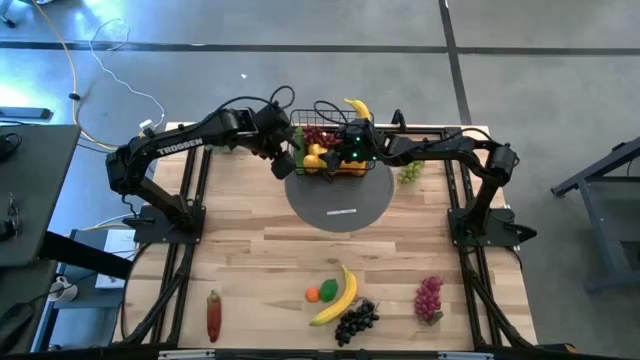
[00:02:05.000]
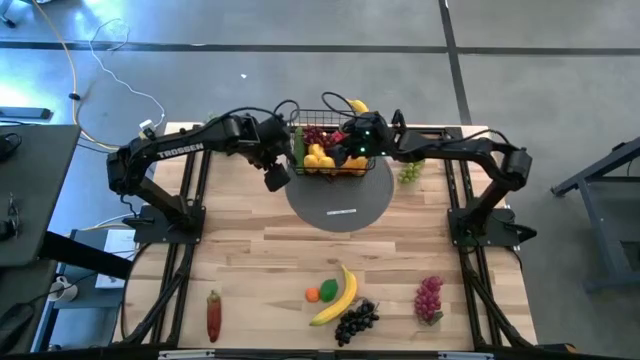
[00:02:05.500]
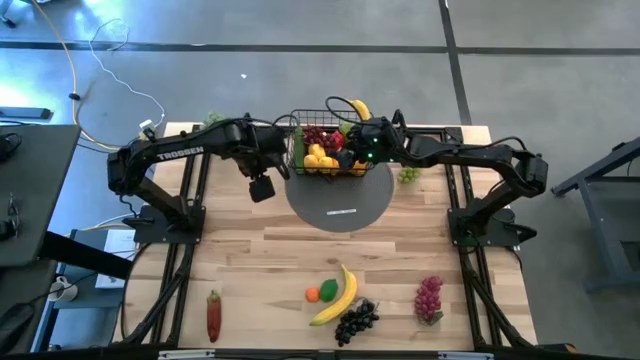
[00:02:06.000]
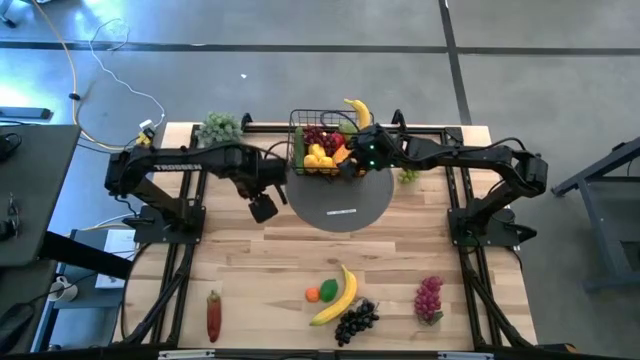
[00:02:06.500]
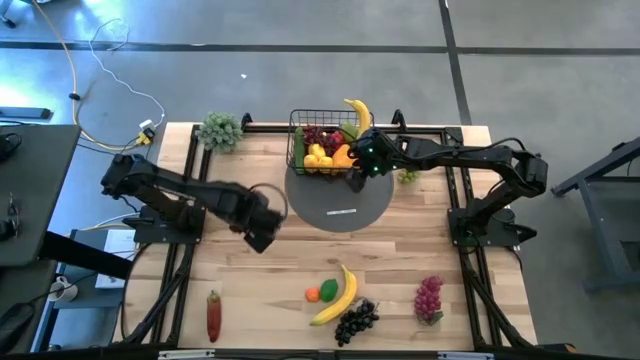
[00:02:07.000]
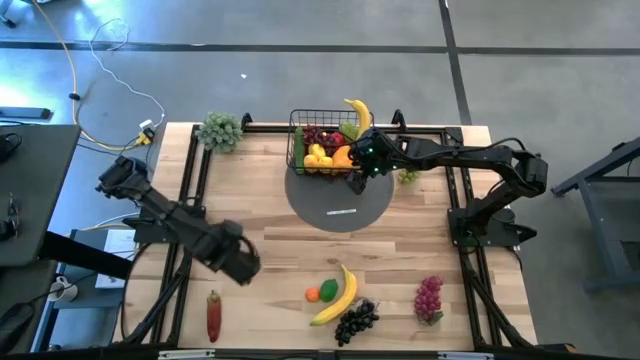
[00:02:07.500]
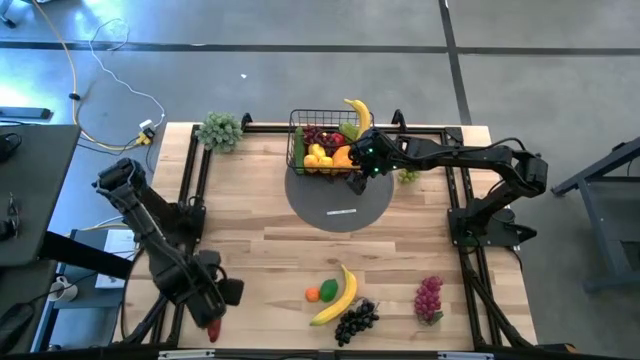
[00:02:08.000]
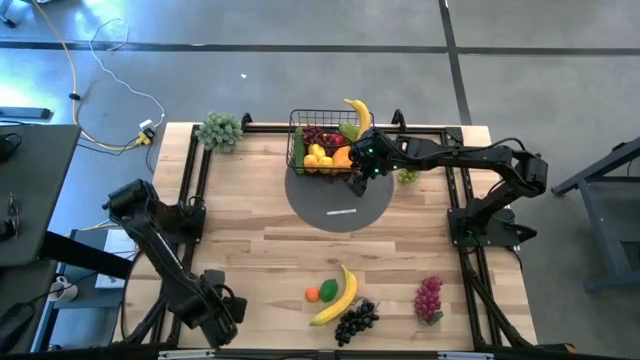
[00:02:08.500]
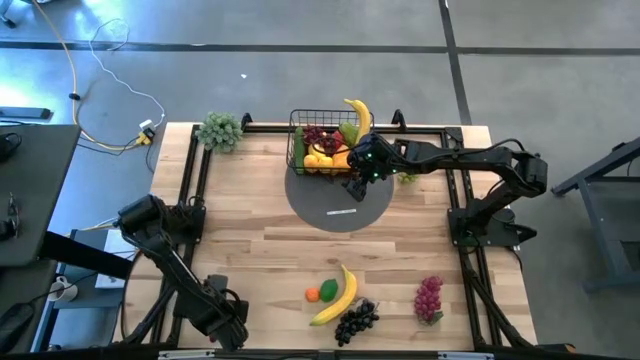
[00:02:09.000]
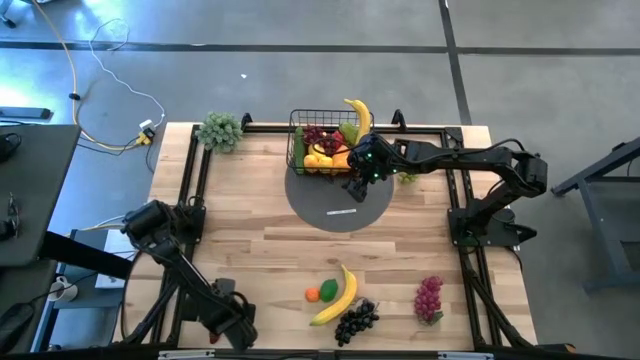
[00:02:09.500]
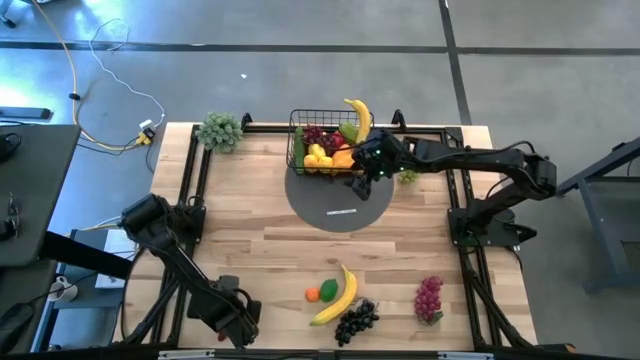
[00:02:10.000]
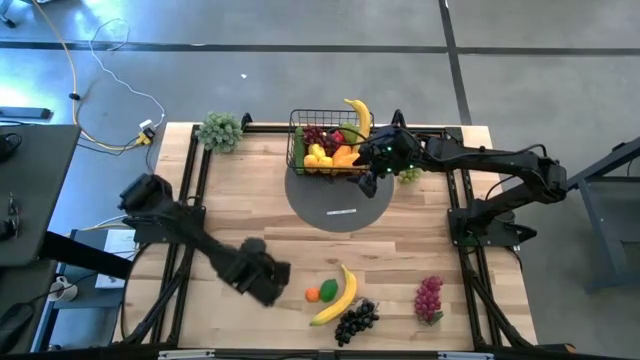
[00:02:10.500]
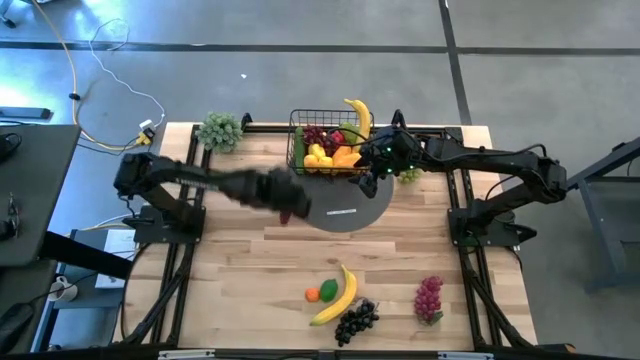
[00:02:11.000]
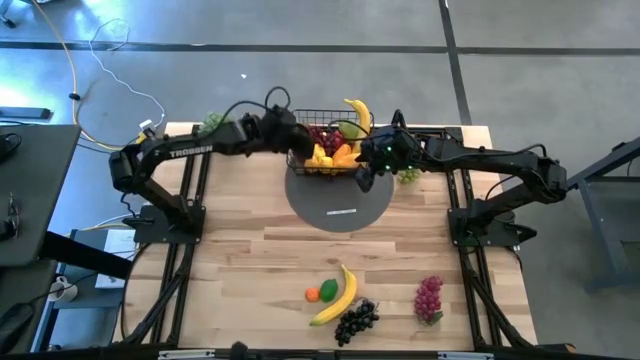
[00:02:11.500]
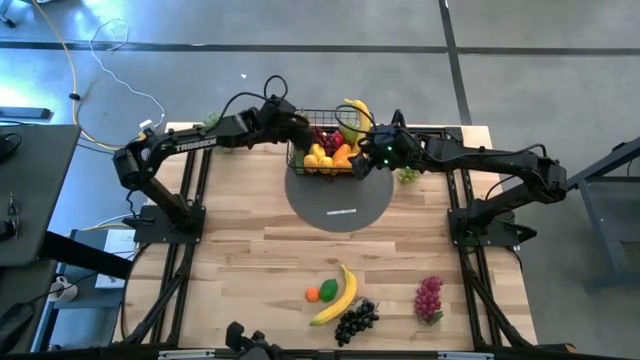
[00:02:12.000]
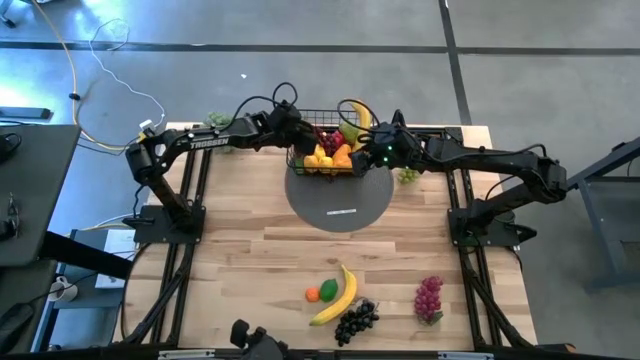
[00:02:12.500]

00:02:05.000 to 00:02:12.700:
Task: Build produce basket
Put the chili pepper into the wire basket

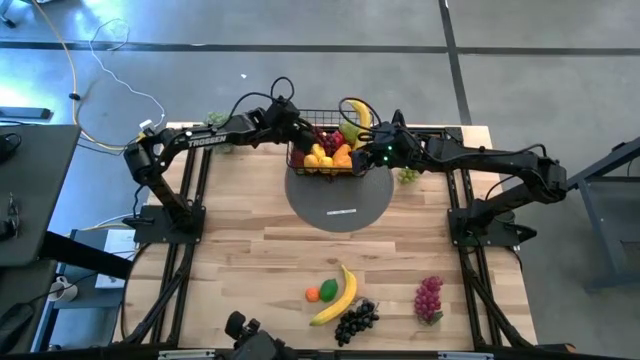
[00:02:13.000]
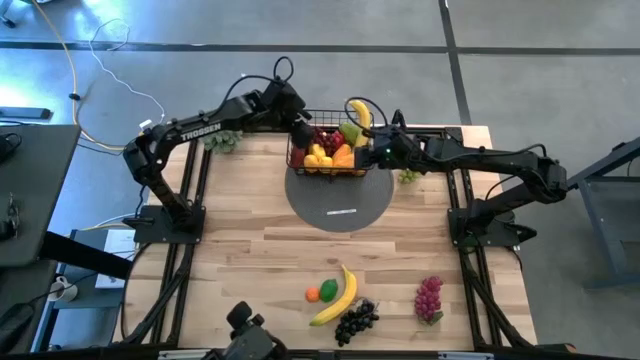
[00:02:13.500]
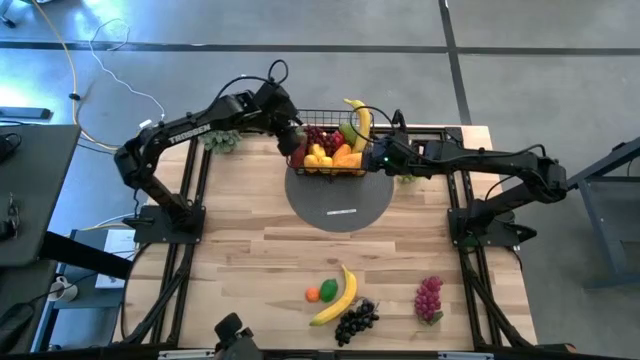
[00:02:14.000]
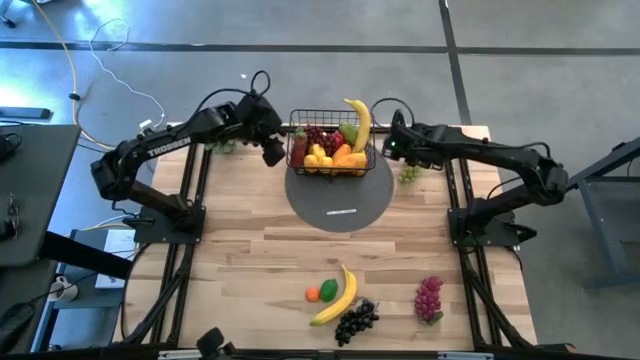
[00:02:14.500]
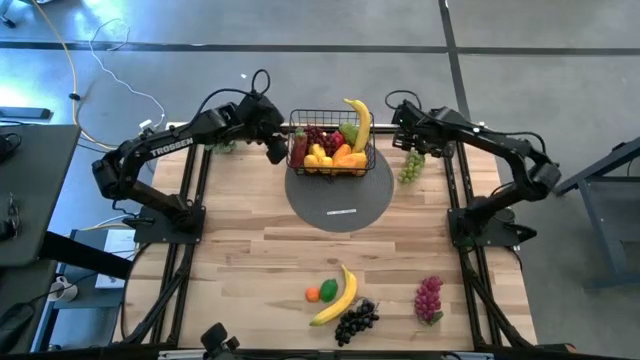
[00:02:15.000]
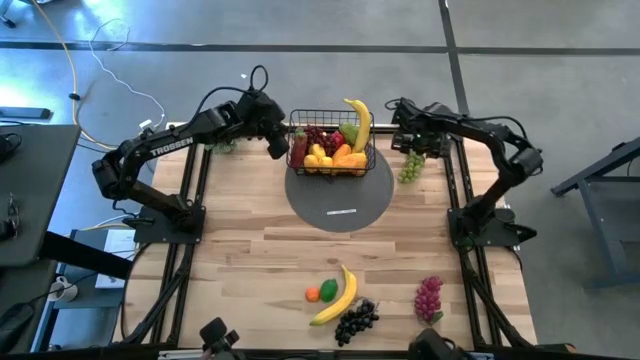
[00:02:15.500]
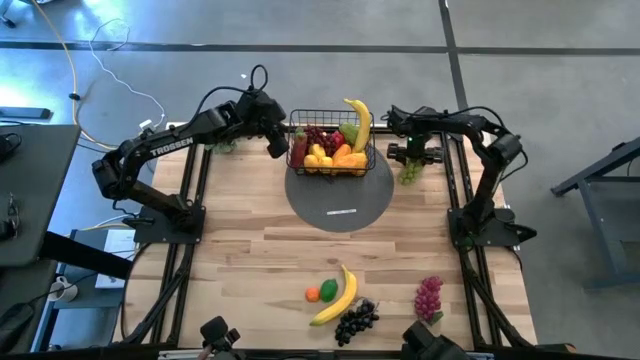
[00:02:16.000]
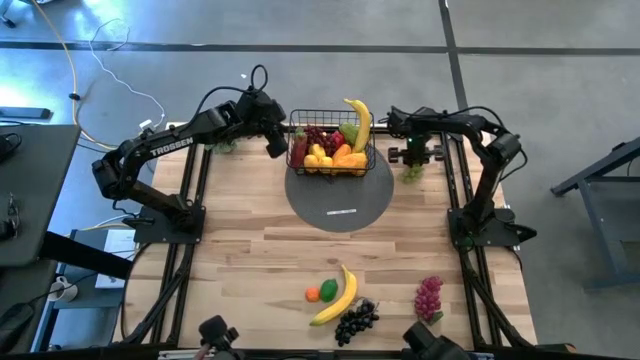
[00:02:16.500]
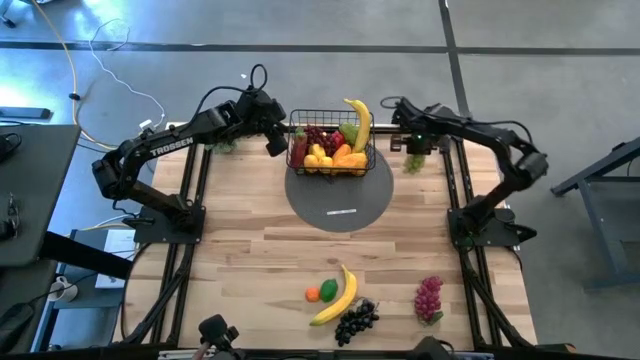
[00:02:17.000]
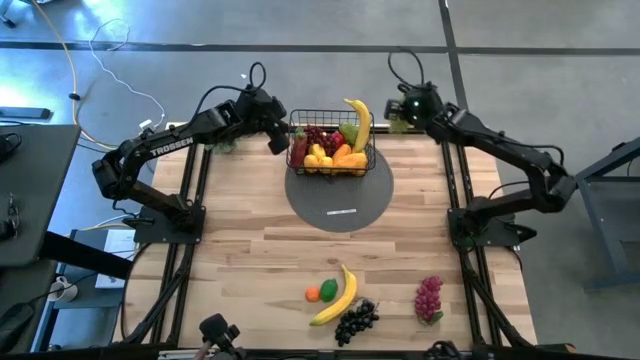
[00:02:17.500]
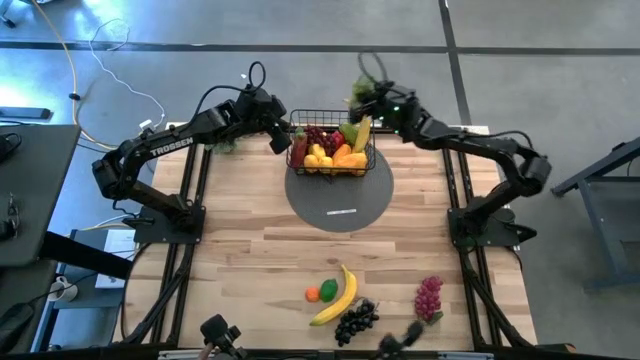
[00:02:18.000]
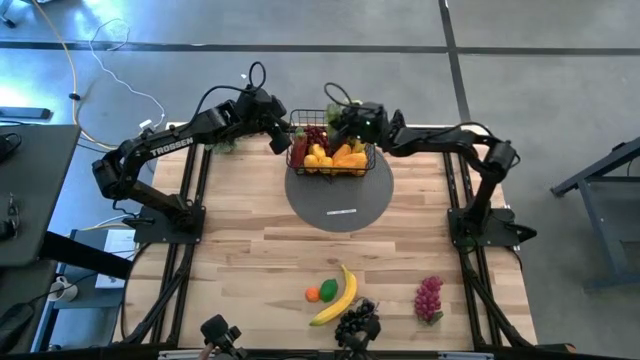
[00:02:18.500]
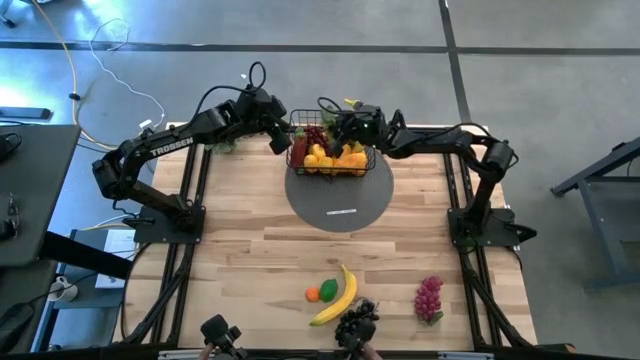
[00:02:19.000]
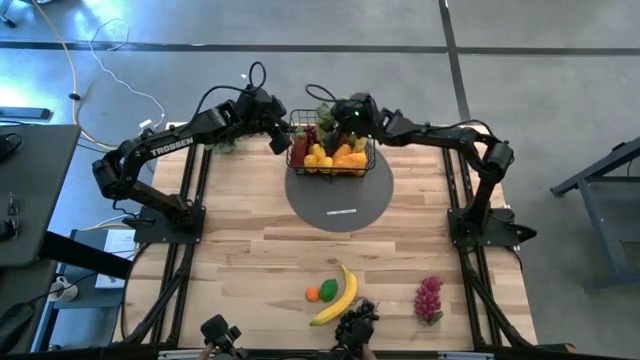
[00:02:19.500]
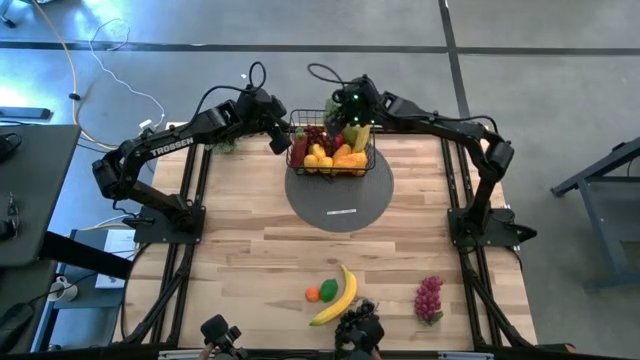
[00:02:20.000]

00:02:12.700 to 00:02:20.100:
Put the grapes into the wire basket

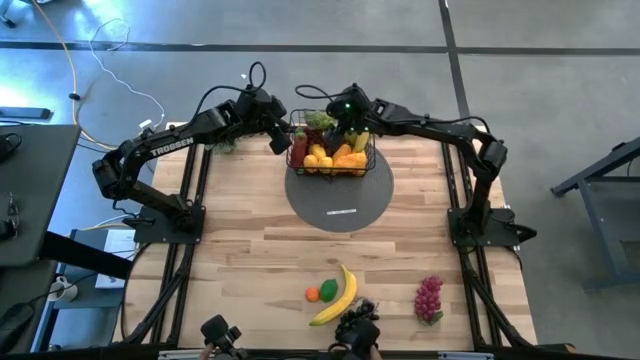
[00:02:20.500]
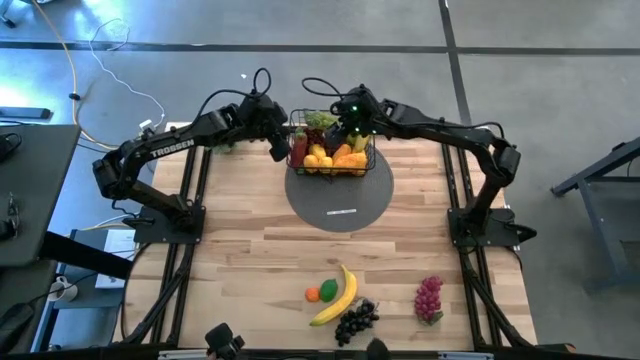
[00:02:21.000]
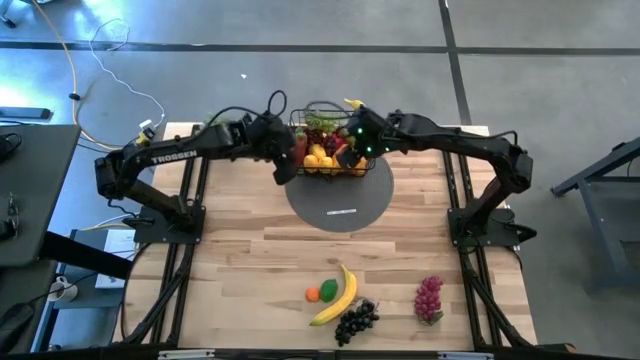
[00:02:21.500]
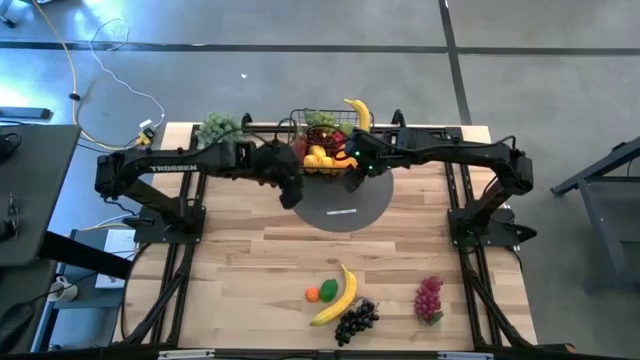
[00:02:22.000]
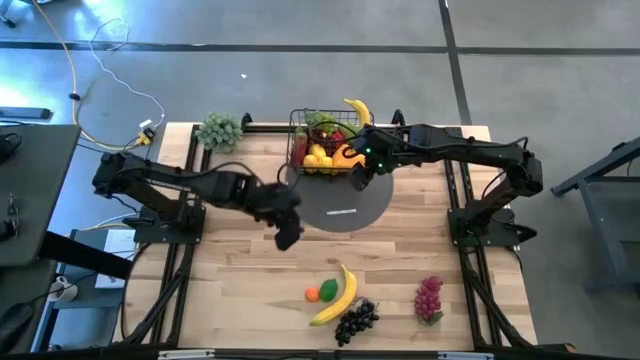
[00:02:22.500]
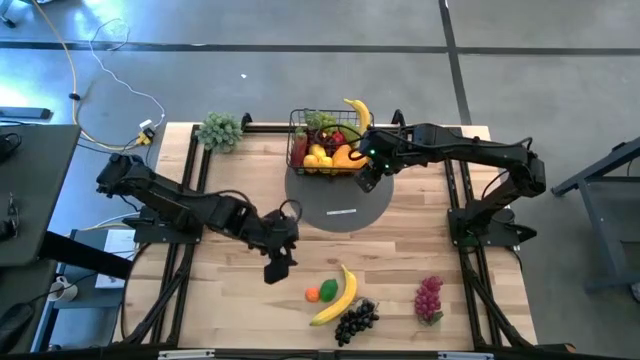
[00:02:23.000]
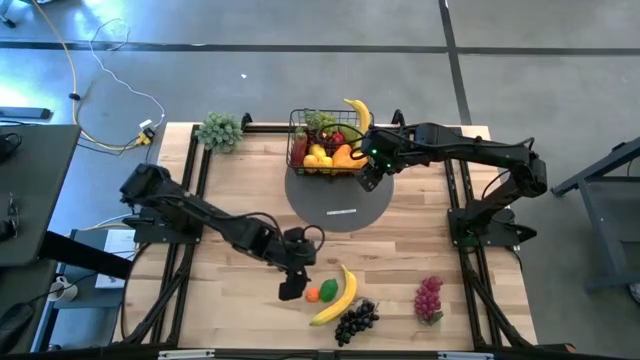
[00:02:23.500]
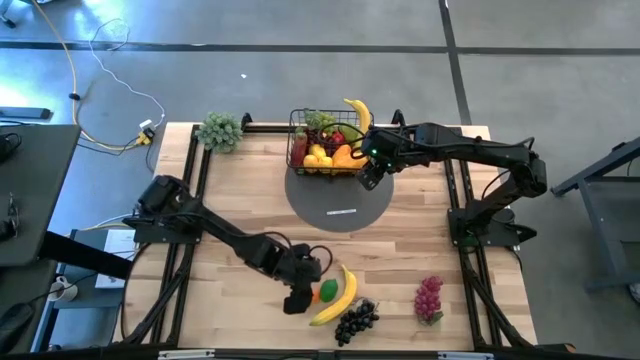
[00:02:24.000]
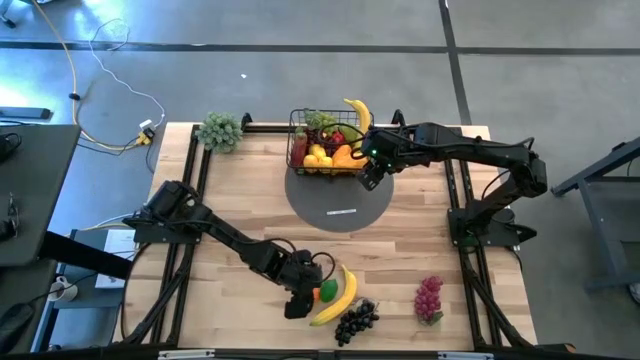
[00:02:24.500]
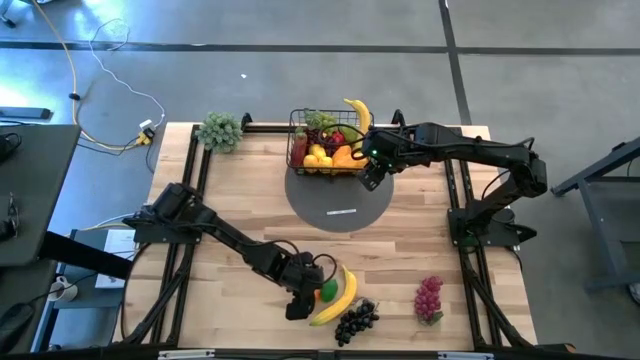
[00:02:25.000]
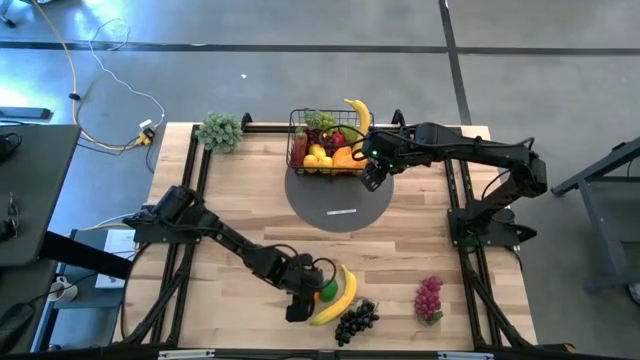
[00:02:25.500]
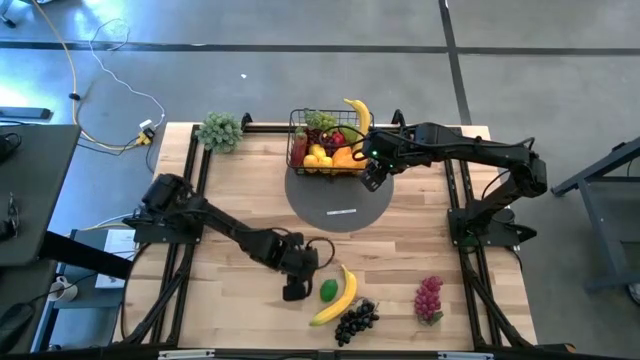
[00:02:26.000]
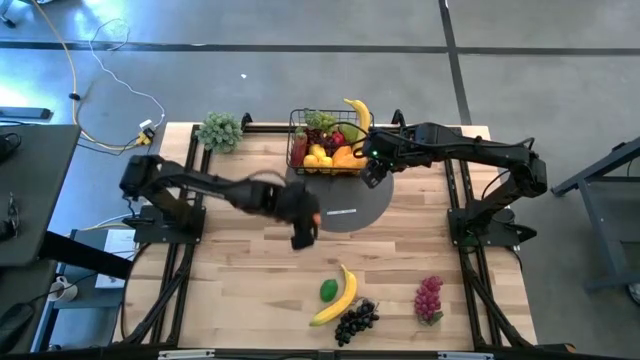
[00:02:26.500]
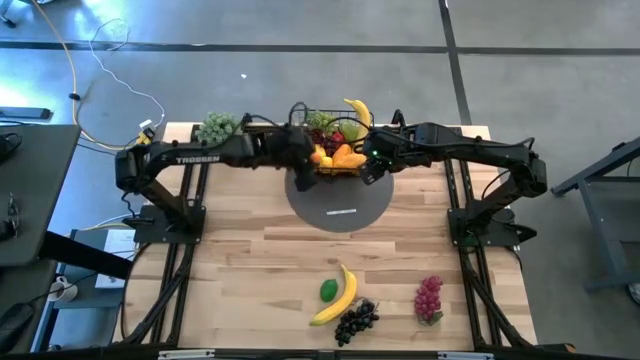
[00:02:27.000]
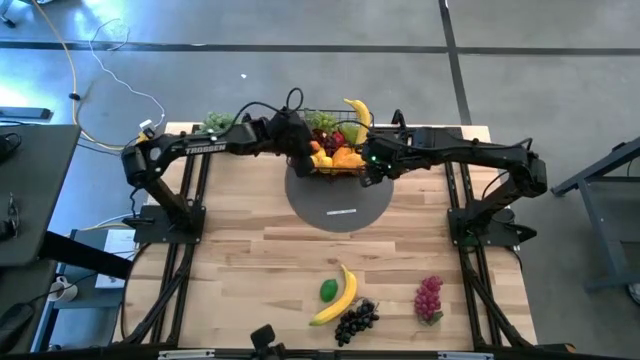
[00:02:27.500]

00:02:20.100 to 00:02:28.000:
Put the tangerine into the wire basket
